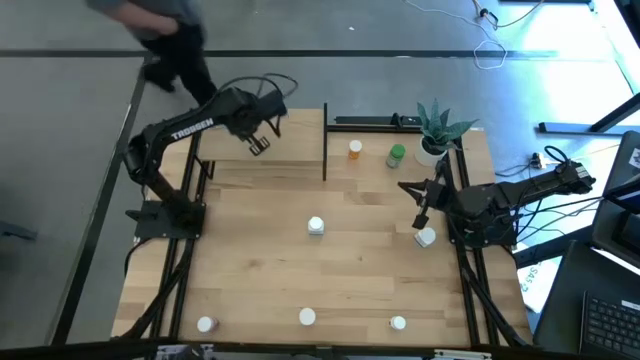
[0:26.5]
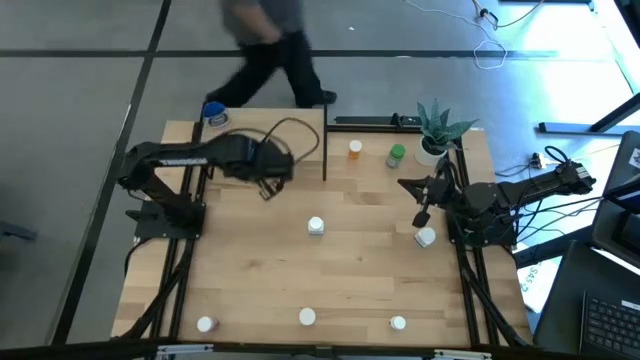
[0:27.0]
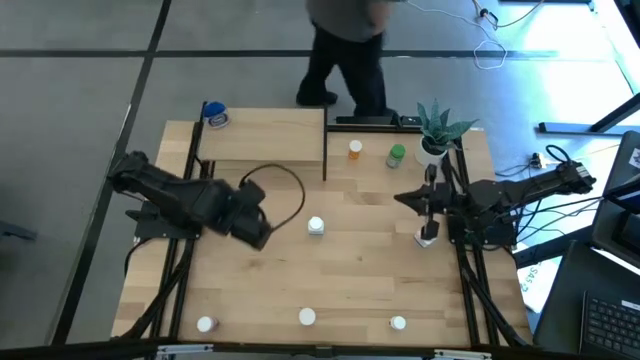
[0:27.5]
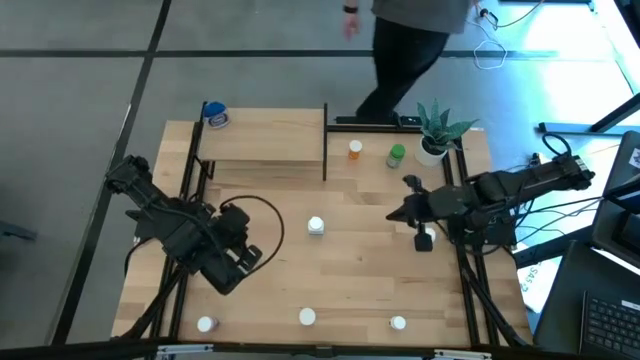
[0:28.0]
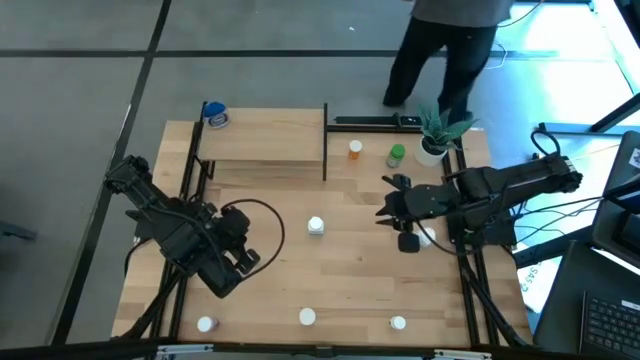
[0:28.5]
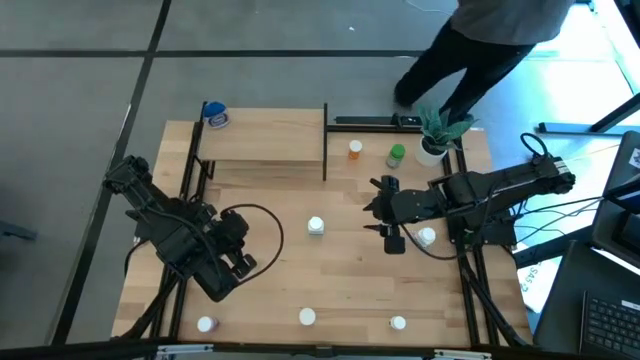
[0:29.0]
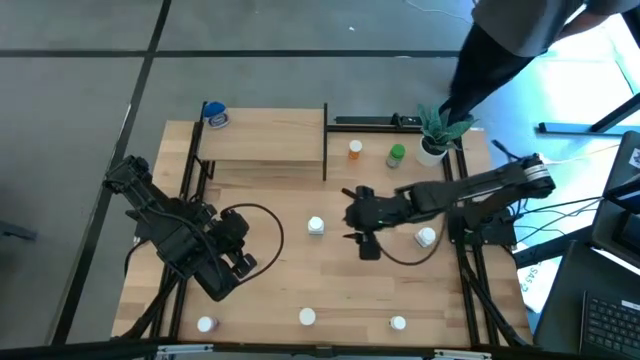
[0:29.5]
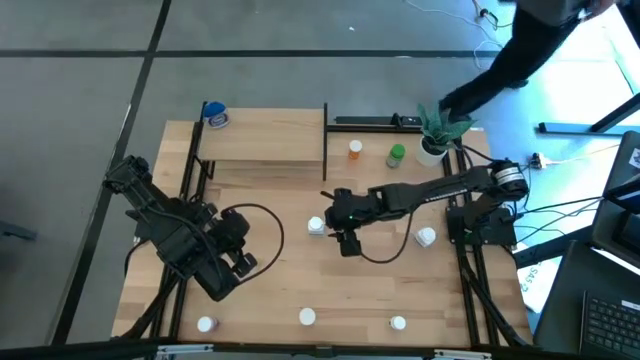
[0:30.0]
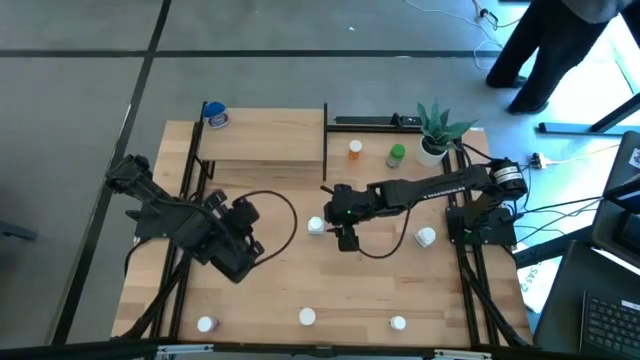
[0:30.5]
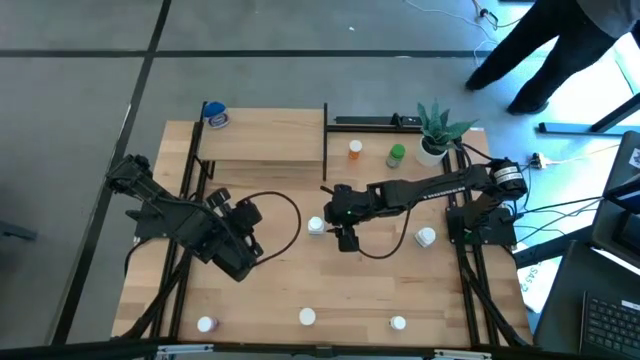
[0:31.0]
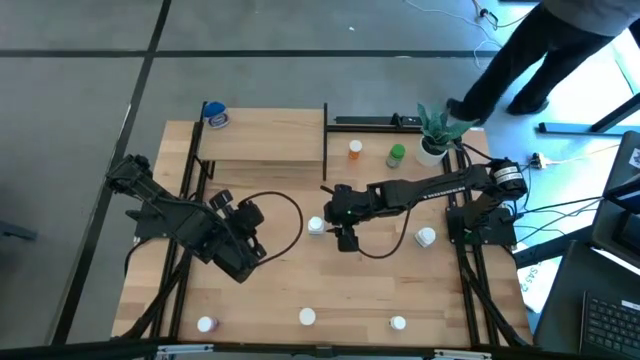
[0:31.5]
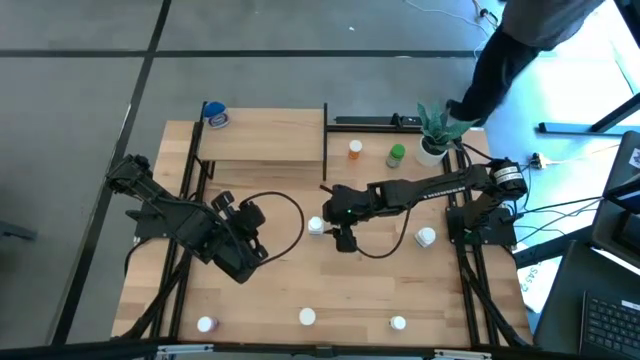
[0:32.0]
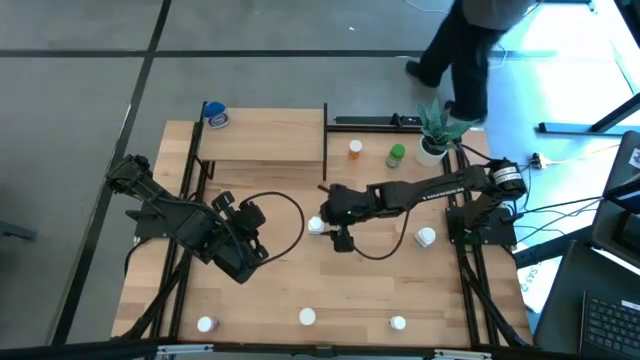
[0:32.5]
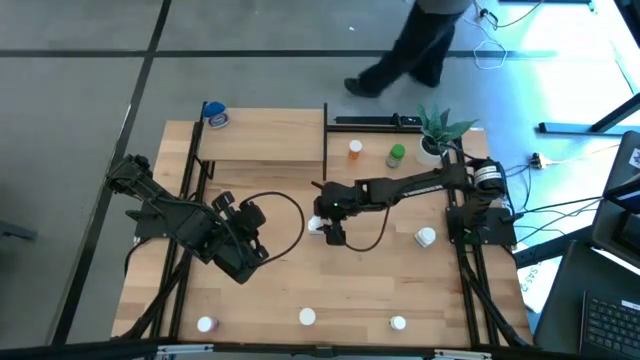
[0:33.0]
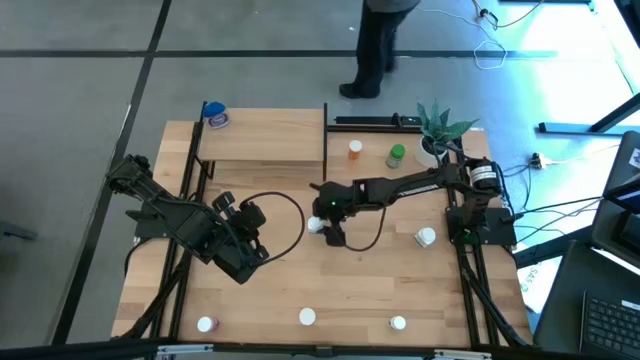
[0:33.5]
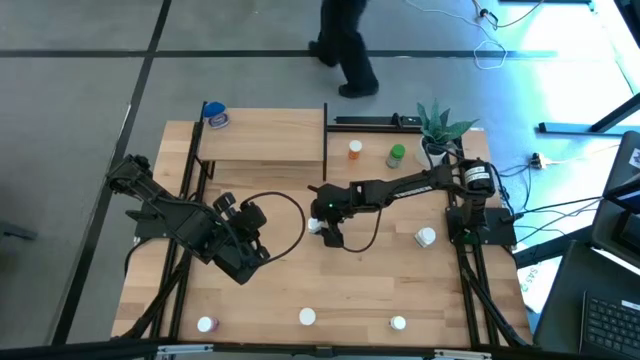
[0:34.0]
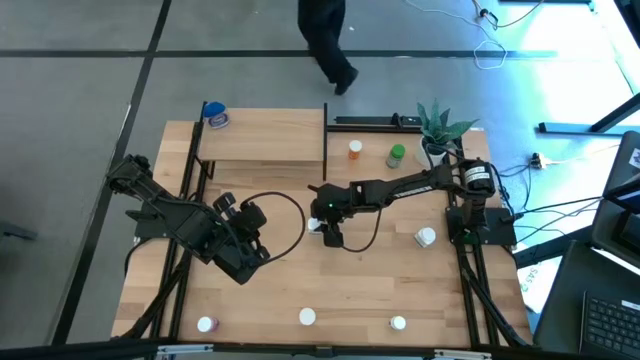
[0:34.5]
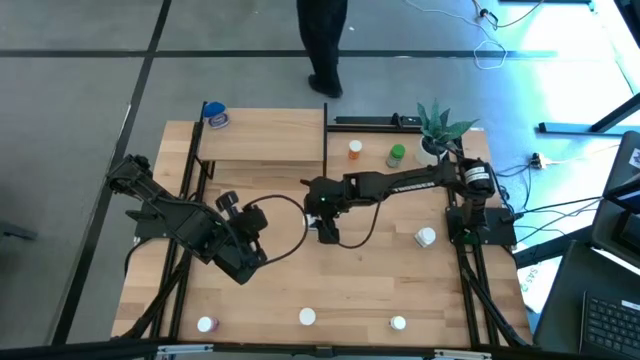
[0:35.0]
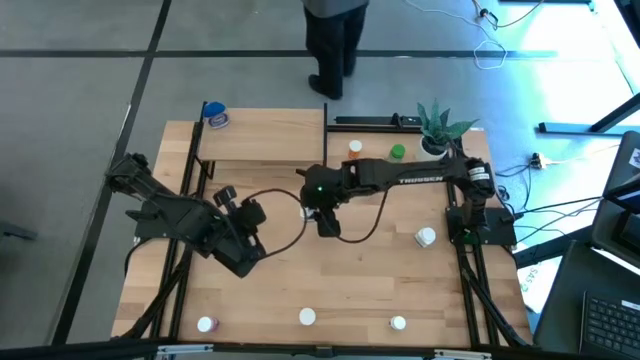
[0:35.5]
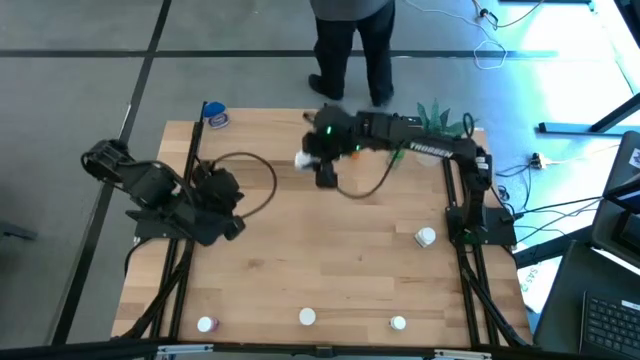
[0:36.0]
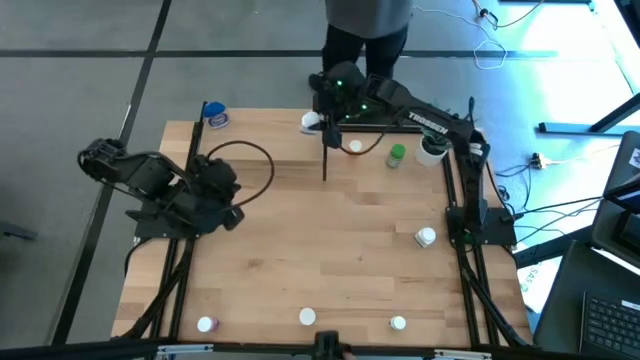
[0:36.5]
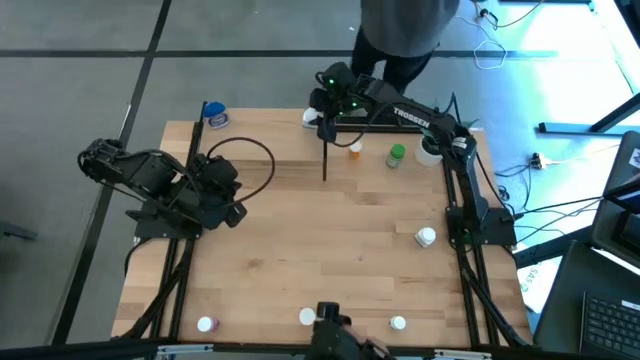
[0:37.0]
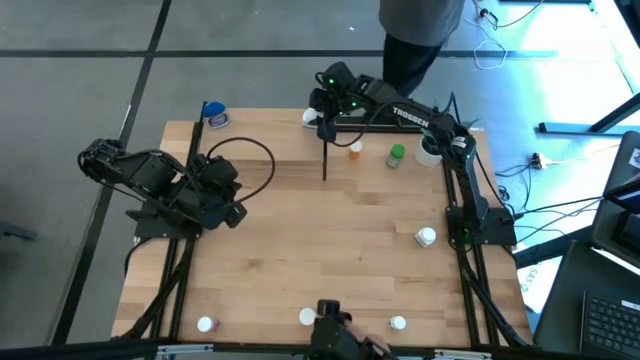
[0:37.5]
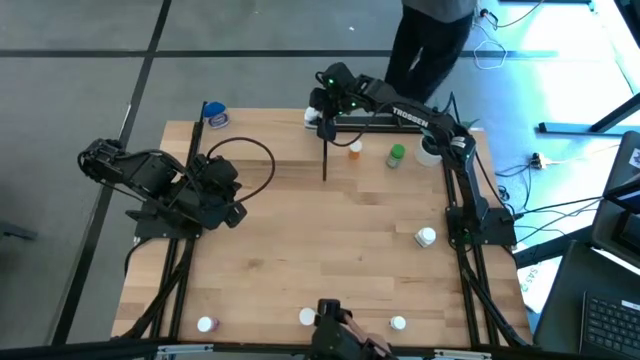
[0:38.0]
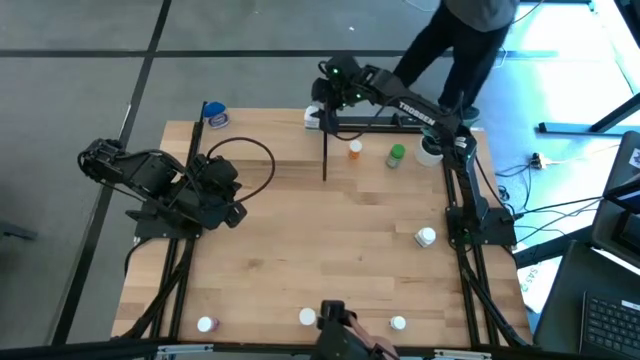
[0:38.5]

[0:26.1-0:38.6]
Task: Pick and place medicine bottles onto shelf by color
Put the left white pill bottle on the shelf
